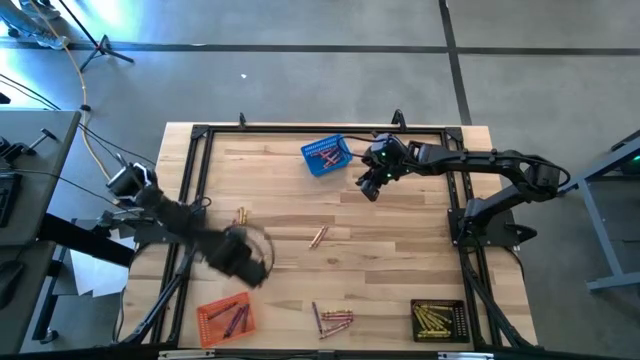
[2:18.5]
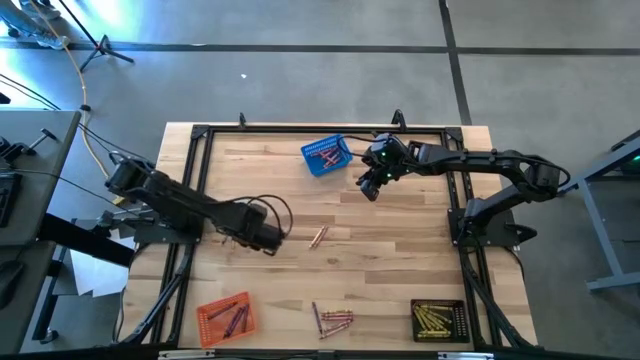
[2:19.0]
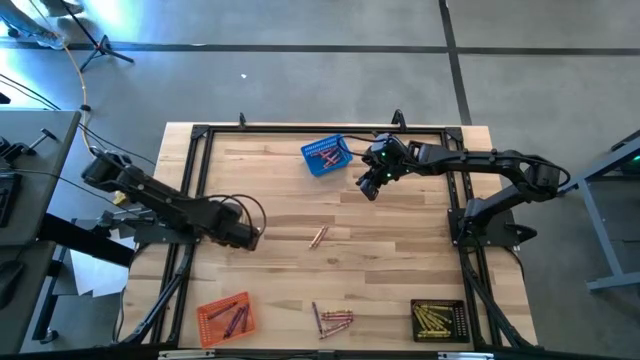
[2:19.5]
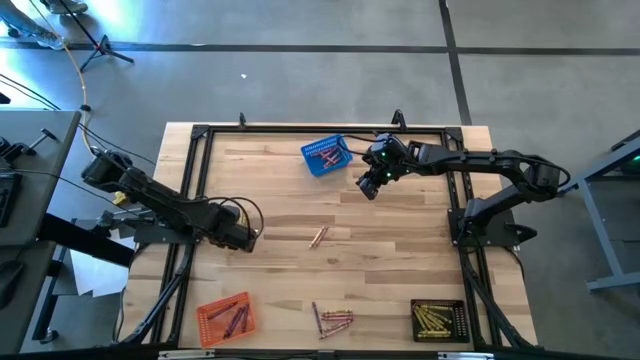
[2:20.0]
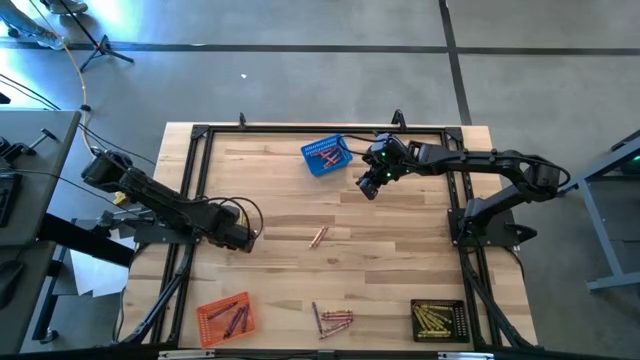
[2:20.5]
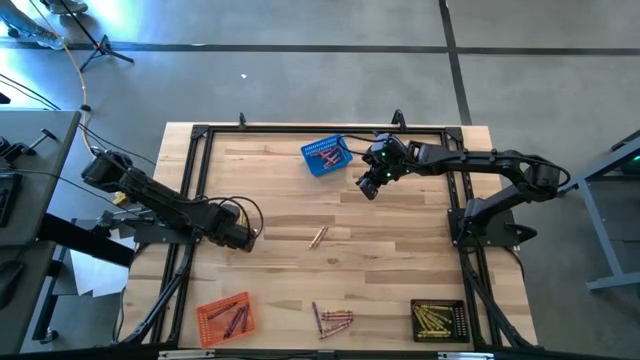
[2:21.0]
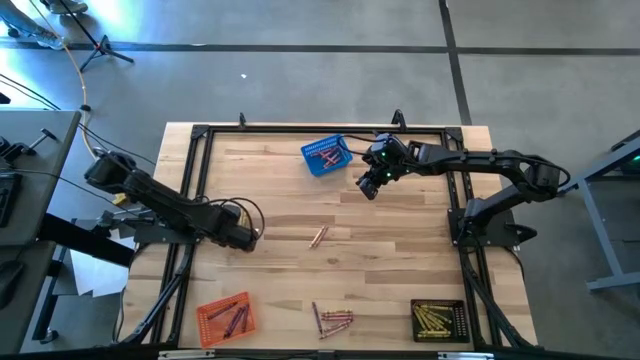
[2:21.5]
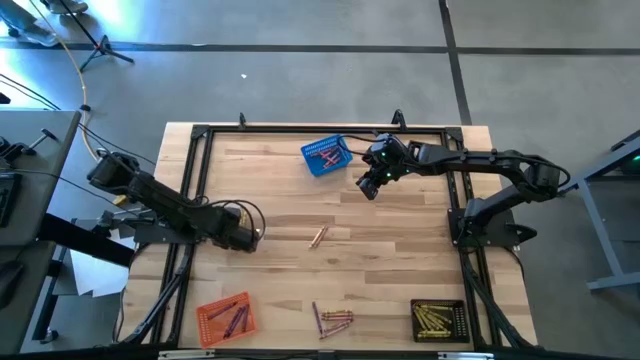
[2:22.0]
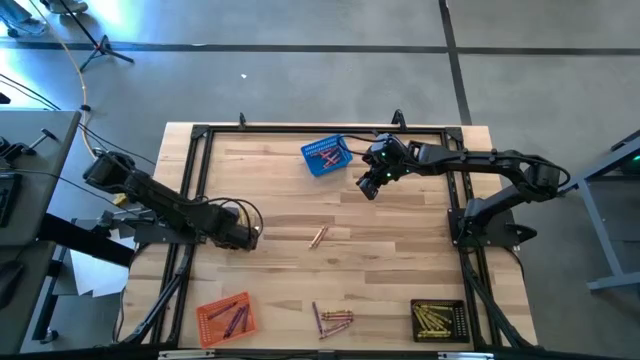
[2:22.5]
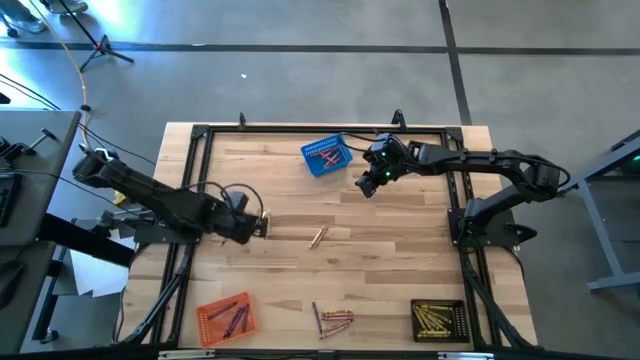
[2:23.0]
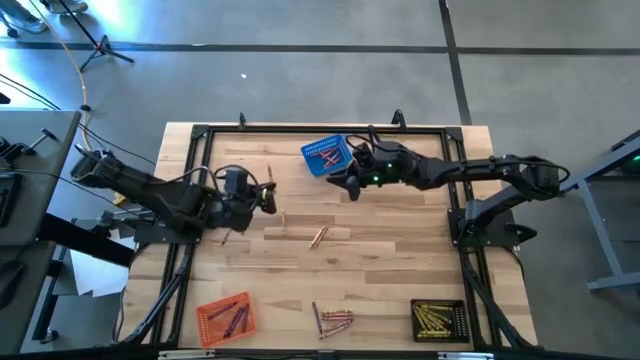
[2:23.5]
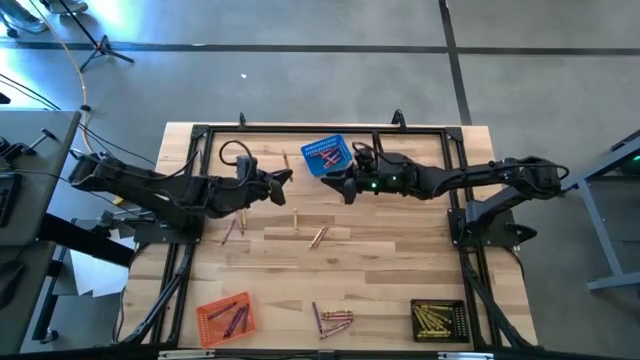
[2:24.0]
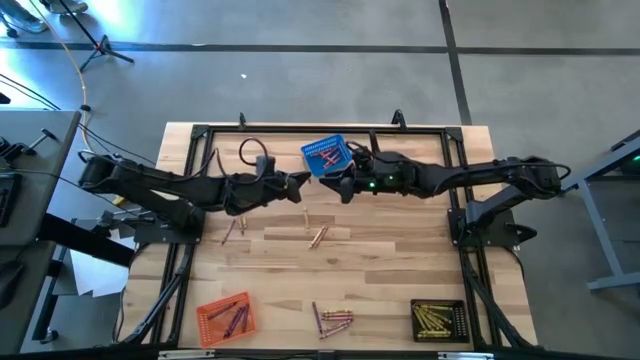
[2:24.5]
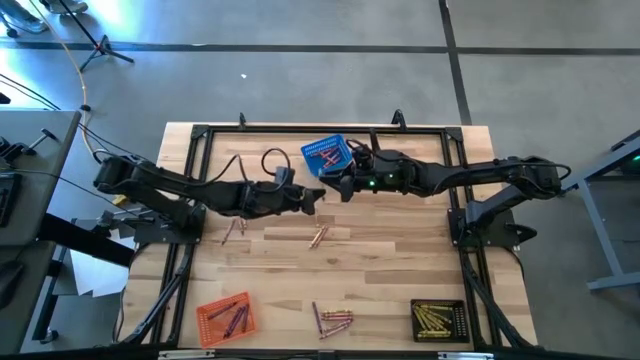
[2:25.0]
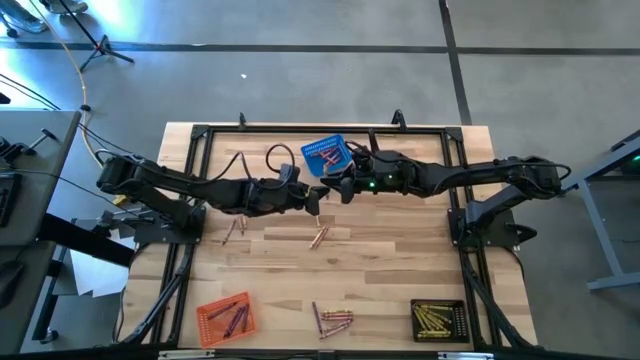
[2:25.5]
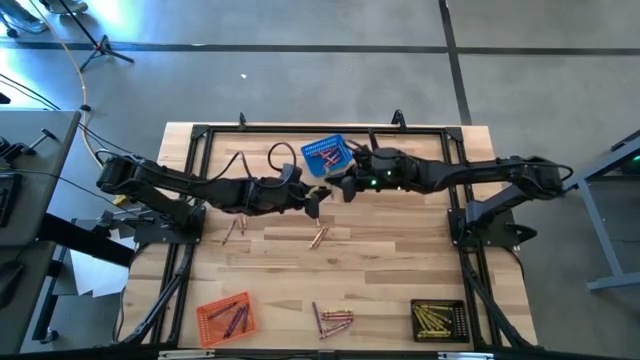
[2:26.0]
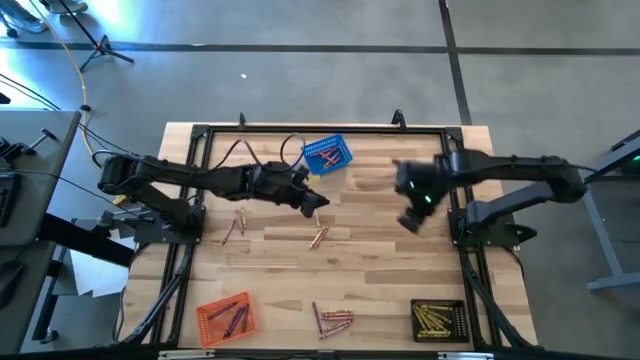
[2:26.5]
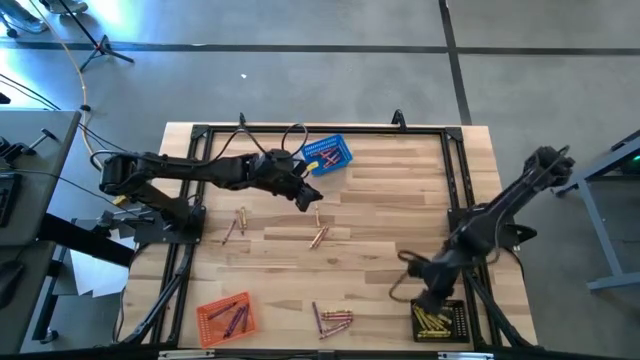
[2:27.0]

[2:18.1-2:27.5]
Task: Sort crayons
Put the yellow crayon into the black bin

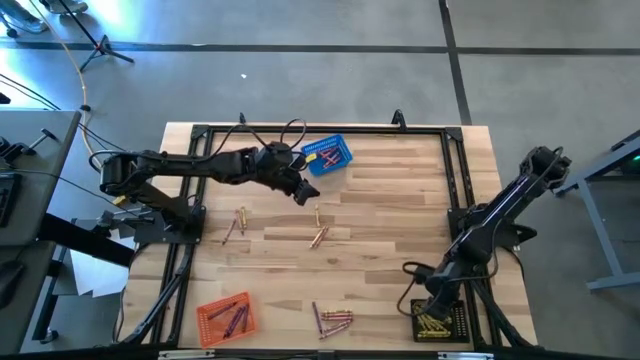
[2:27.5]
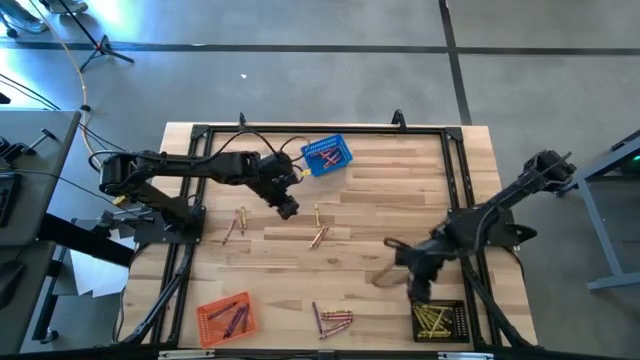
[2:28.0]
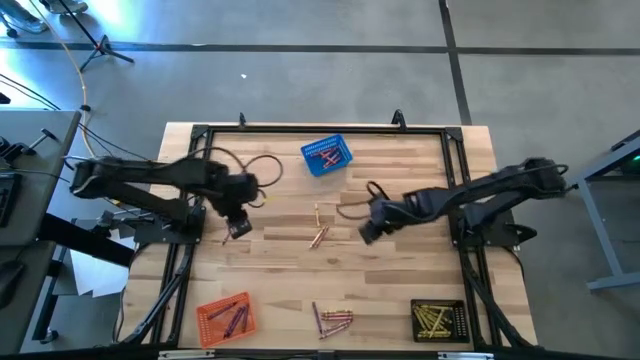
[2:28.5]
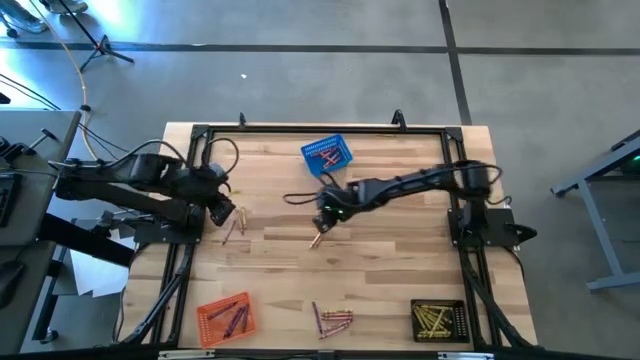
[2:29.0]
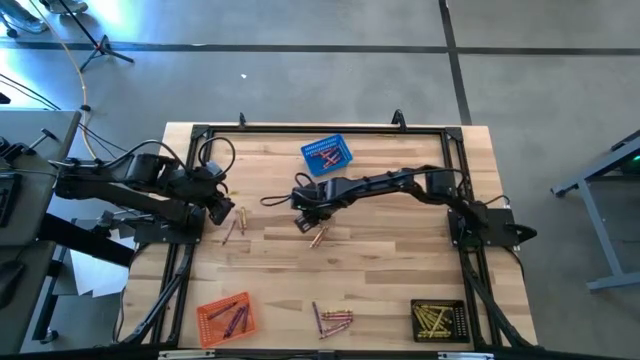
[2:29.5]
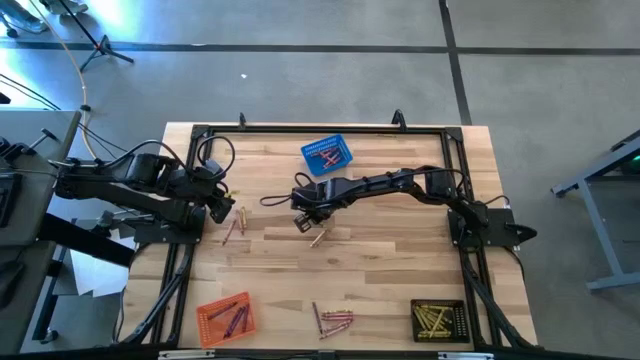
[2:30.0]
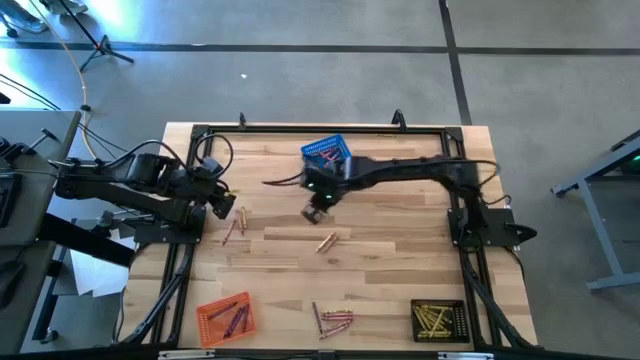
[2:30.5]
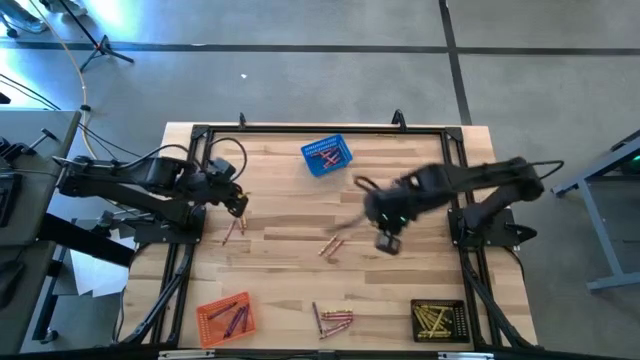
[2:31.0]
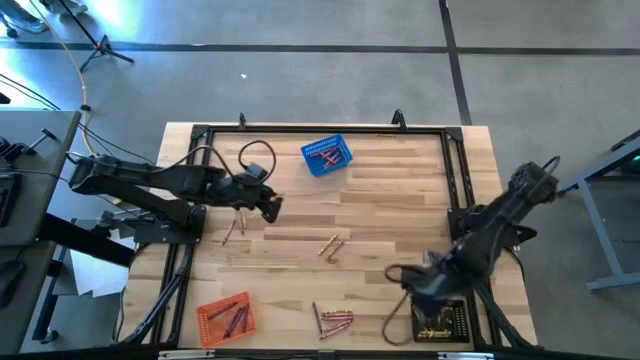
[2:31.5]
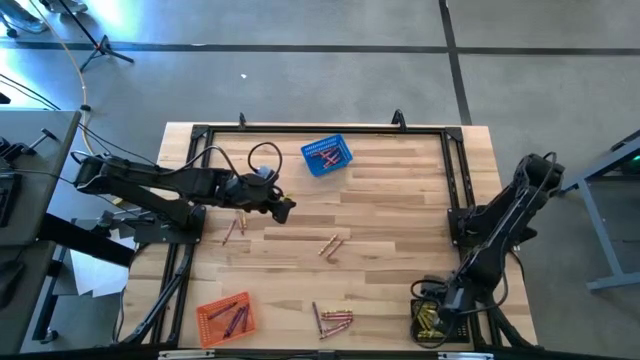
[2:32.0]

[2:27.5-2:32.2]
Put the yellow crayon into the black bin

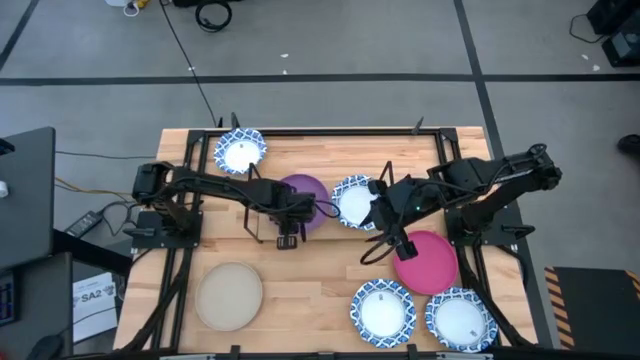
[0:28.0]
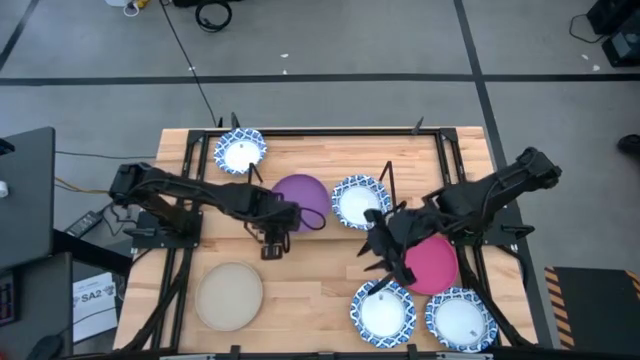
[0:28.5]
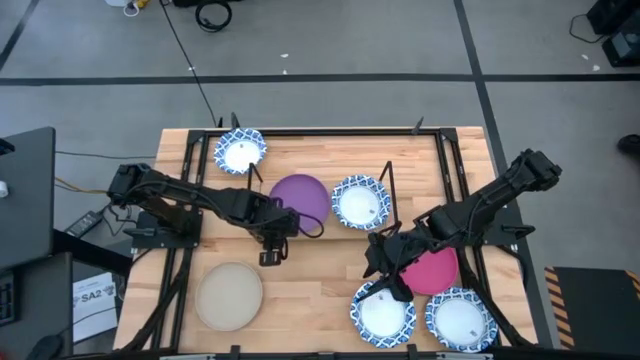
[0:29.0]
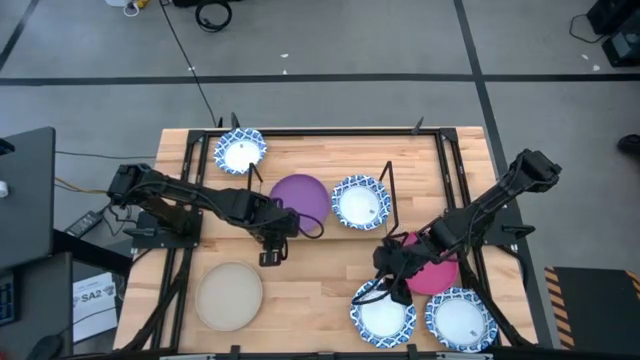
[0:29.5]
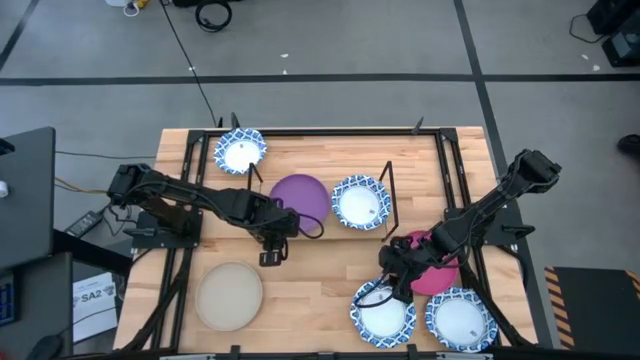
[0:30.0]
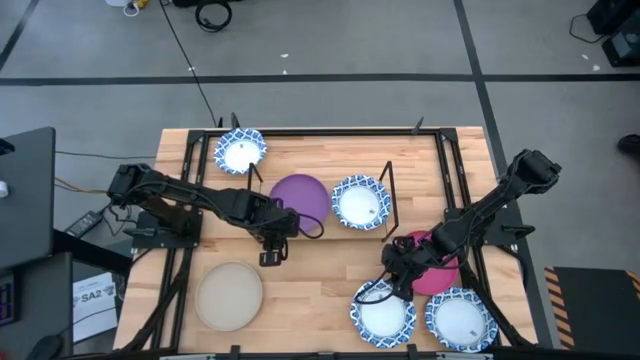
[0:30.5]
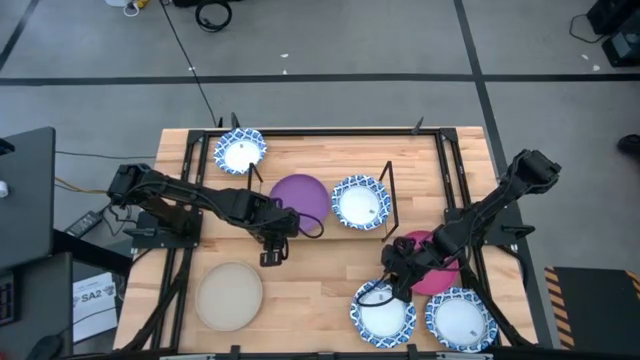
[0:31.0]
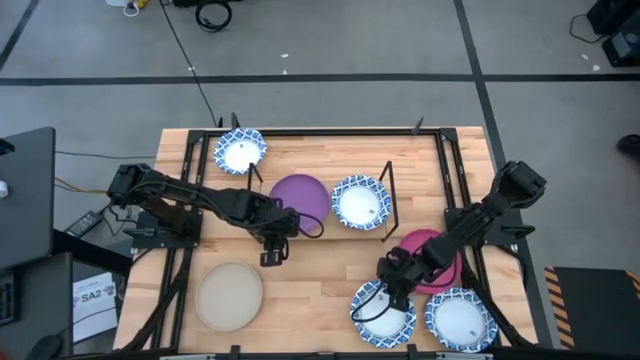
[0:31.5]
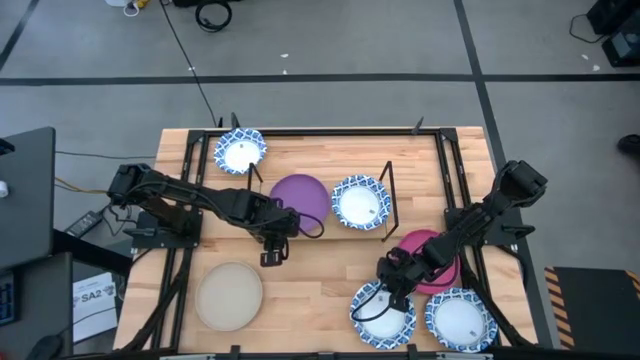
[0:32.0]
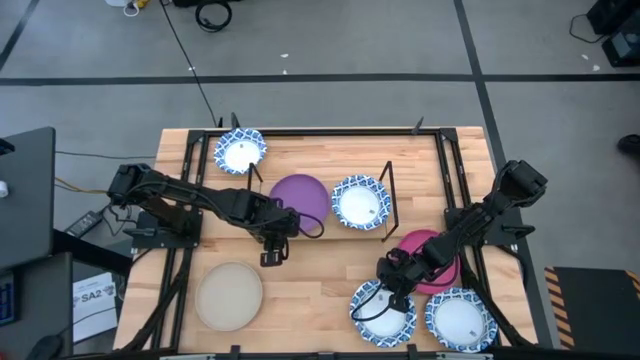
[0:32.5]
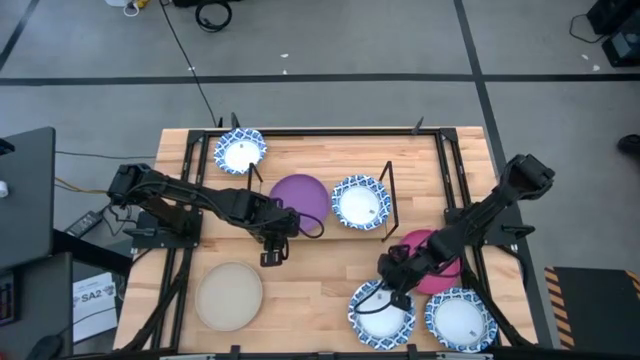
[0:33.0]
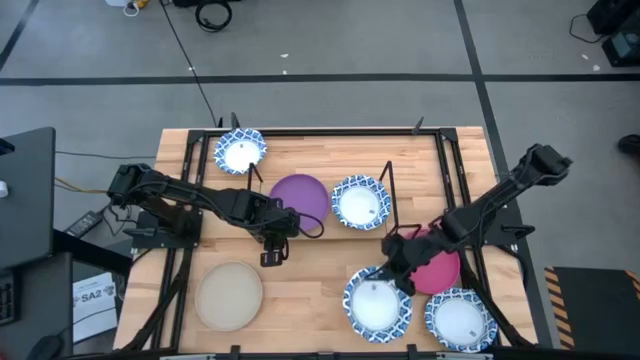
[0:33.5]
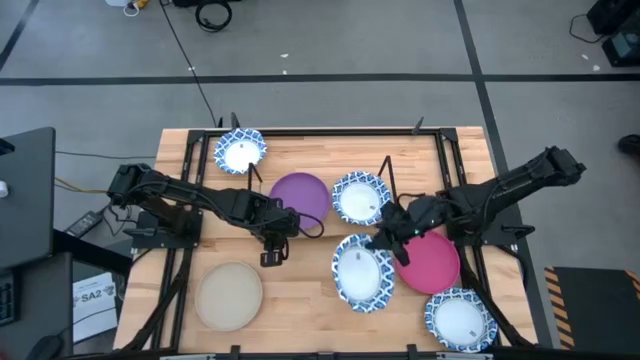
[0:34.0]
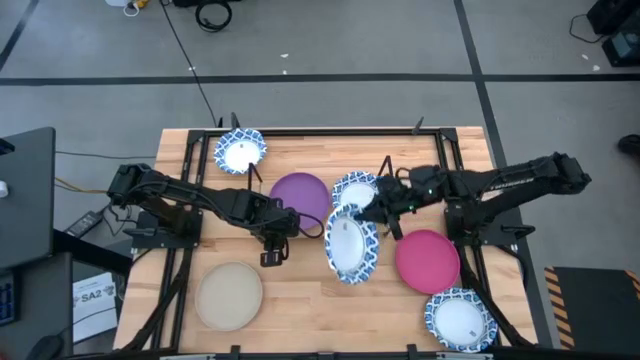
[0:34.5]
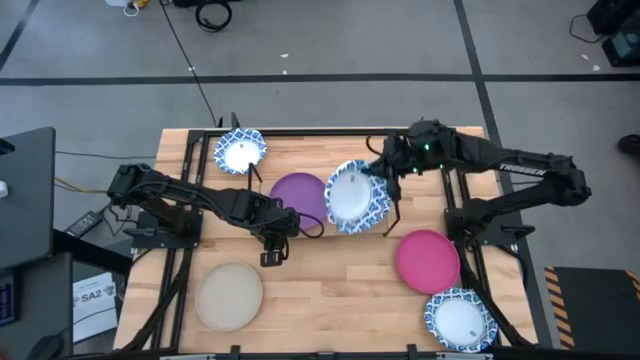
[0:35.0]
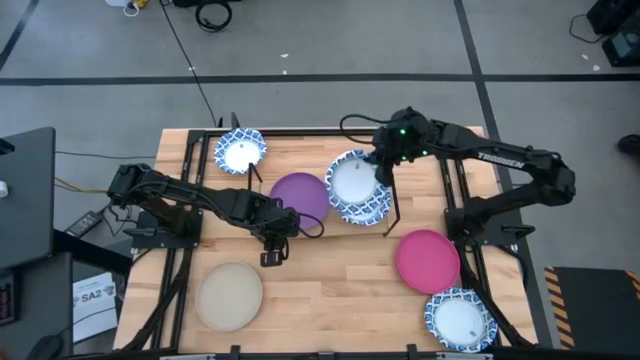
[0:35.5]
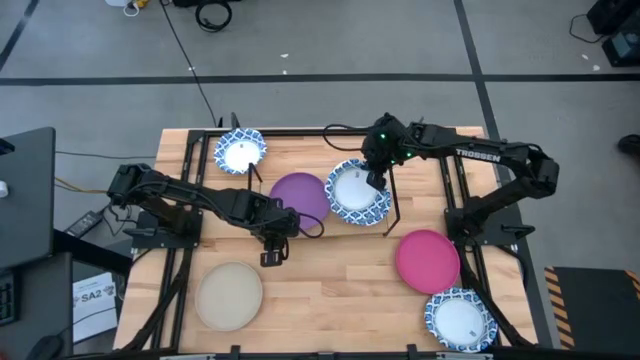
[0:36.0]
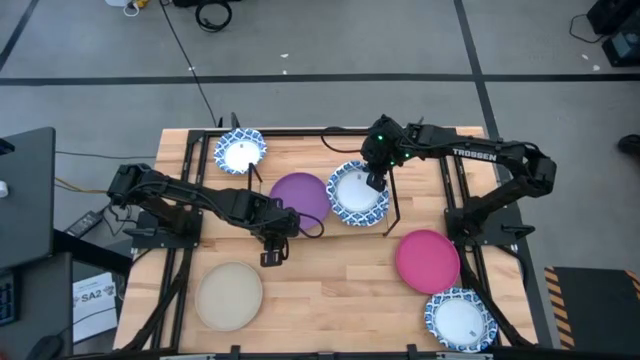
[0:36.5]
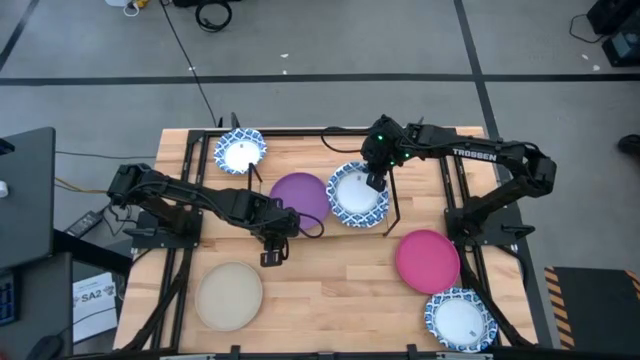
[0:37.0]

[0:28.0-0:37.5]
Task: Place and stack plates onto a shelf
Stack the white-blue patterned bowl on top of the white-blue patterned bowl on the shelf
